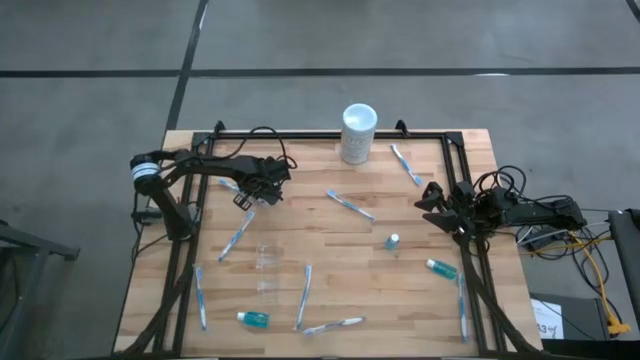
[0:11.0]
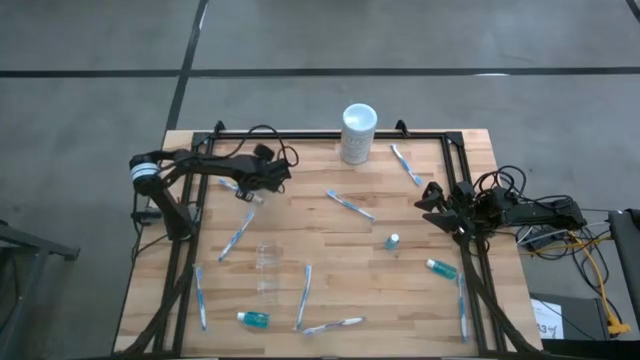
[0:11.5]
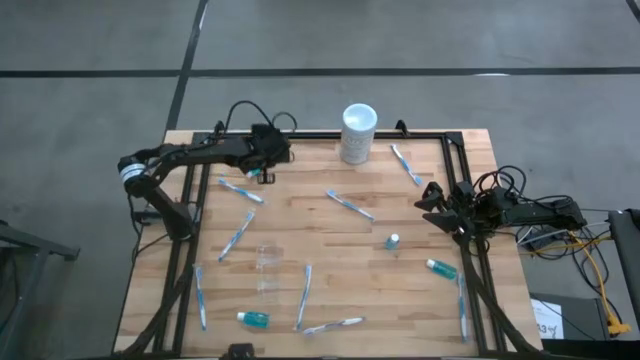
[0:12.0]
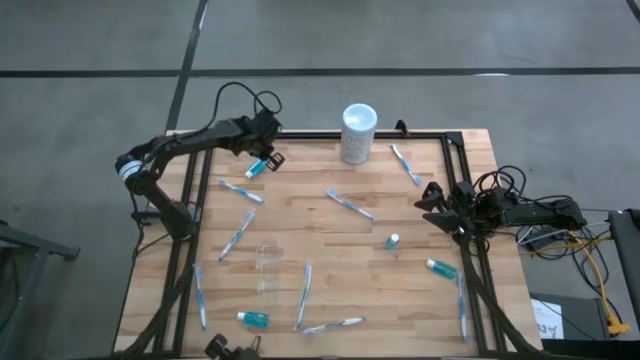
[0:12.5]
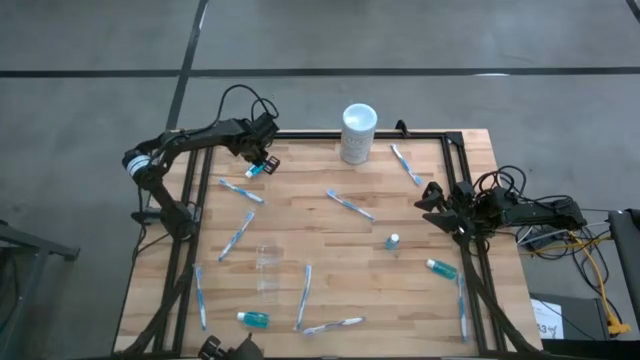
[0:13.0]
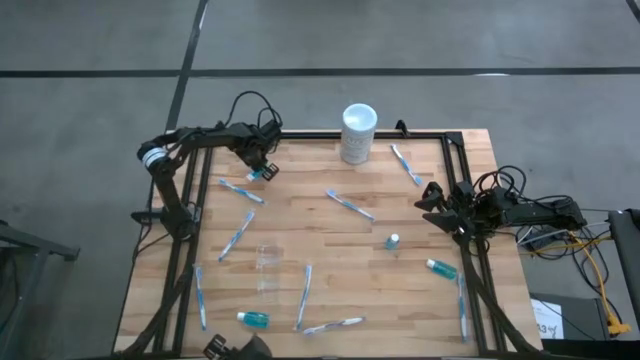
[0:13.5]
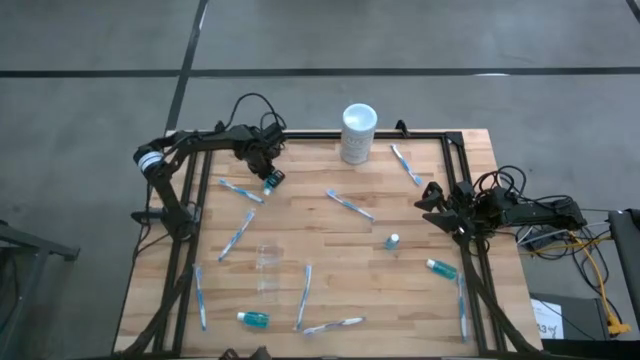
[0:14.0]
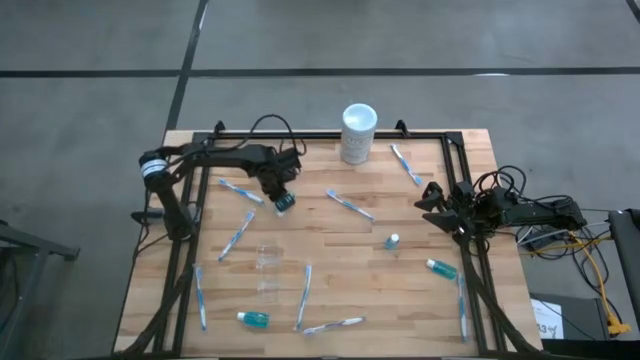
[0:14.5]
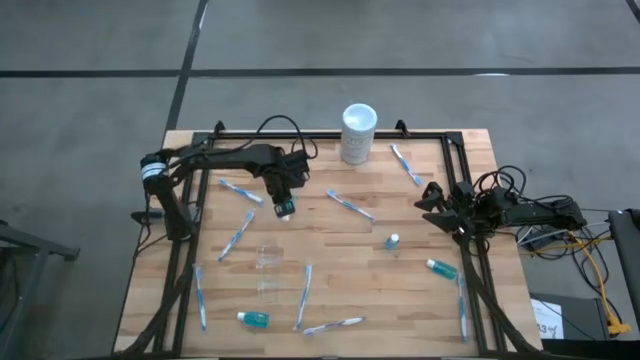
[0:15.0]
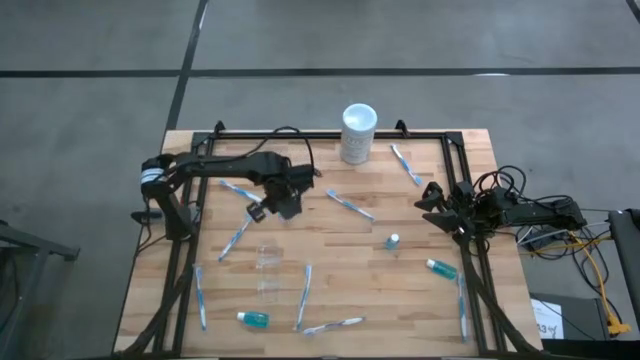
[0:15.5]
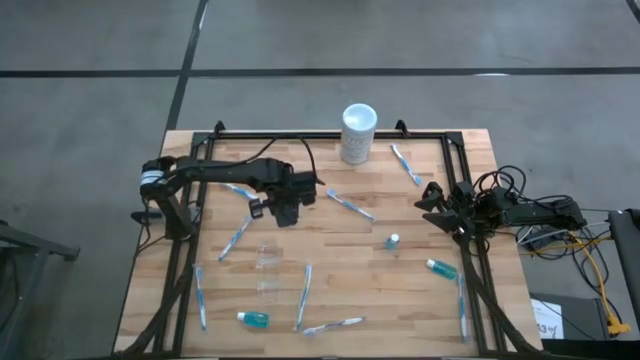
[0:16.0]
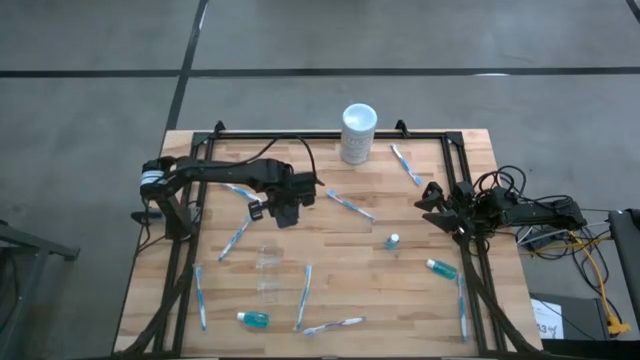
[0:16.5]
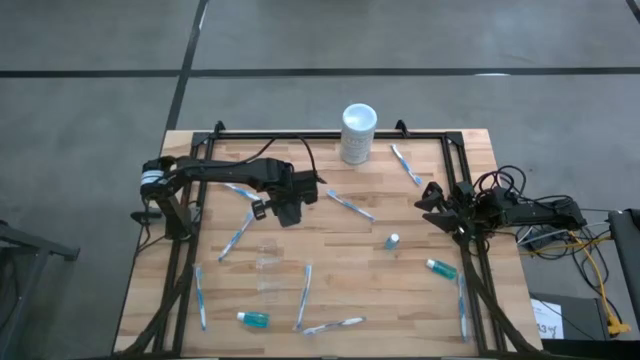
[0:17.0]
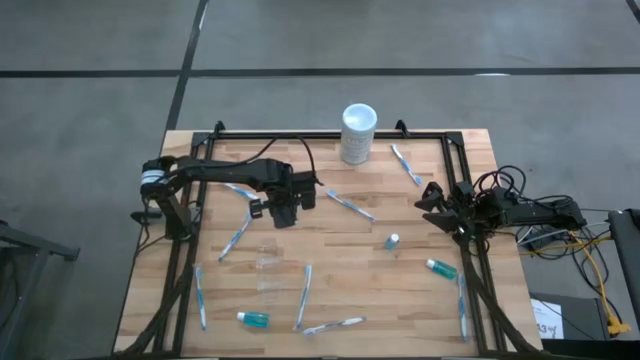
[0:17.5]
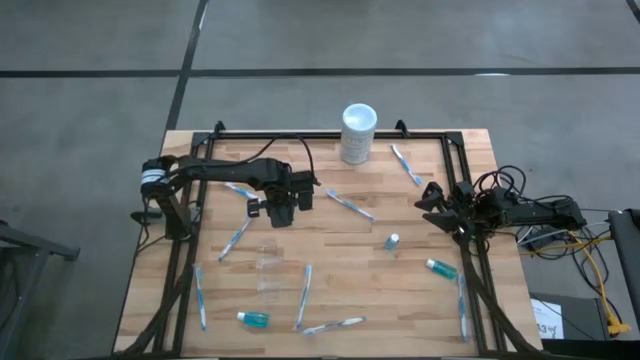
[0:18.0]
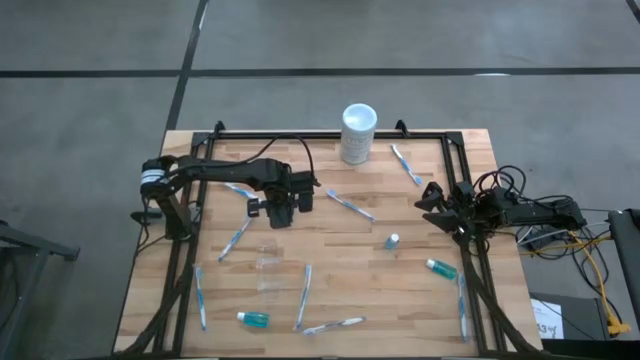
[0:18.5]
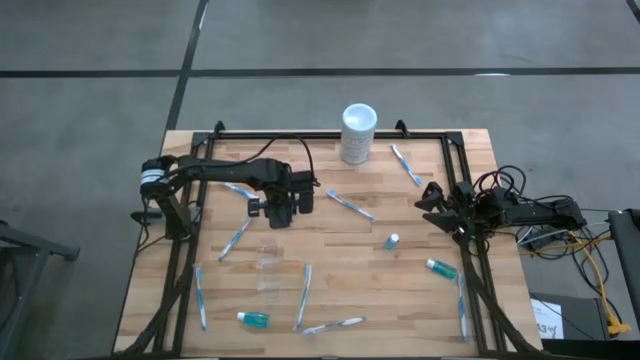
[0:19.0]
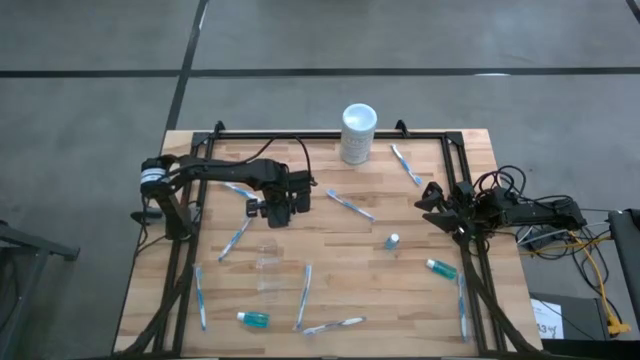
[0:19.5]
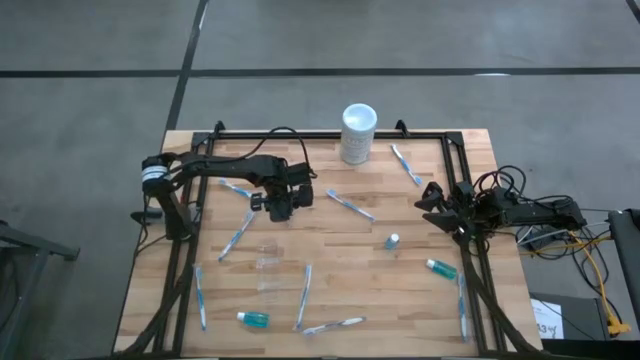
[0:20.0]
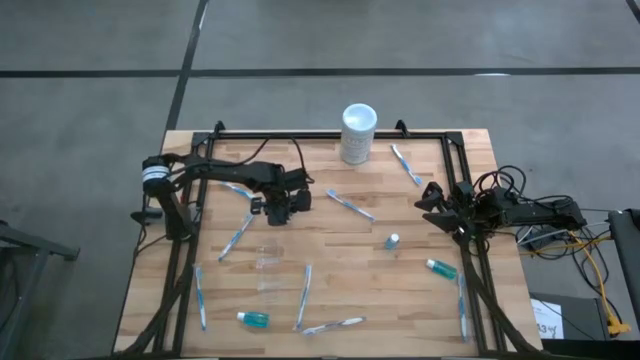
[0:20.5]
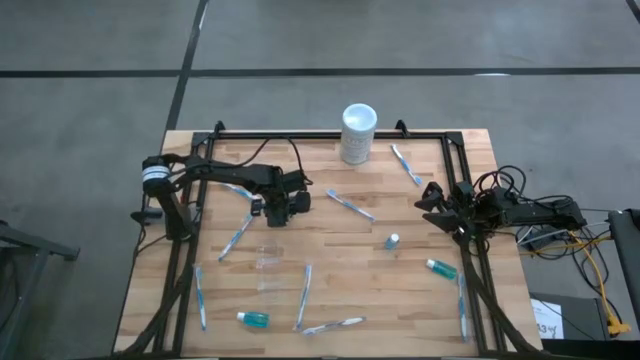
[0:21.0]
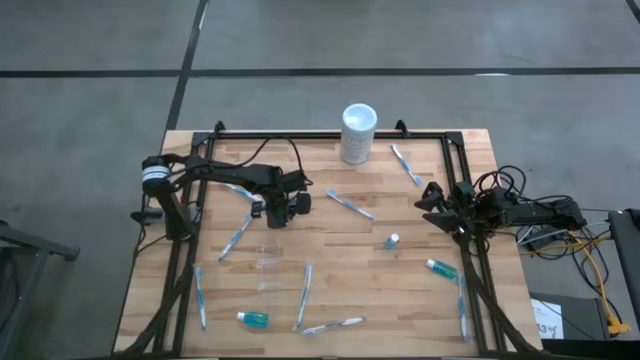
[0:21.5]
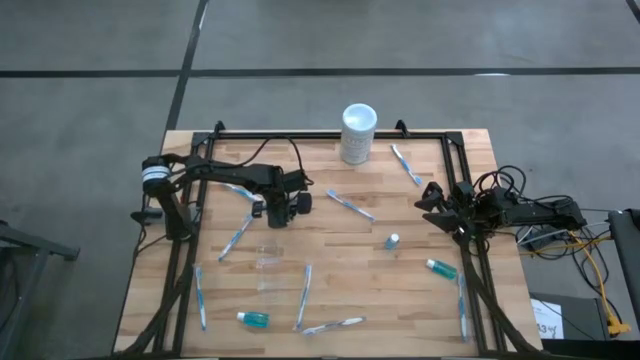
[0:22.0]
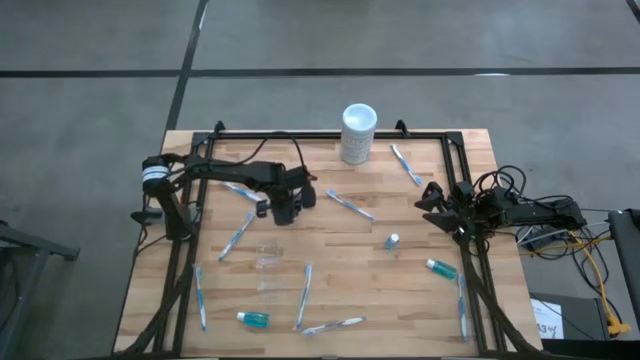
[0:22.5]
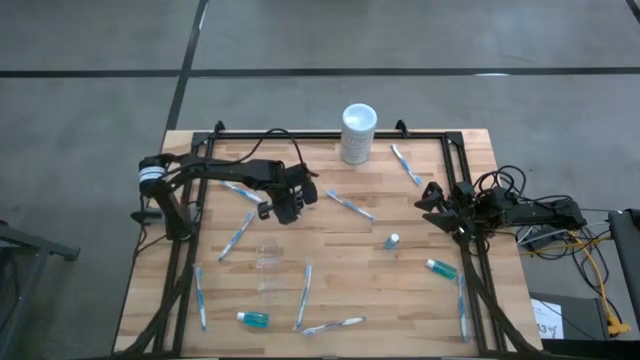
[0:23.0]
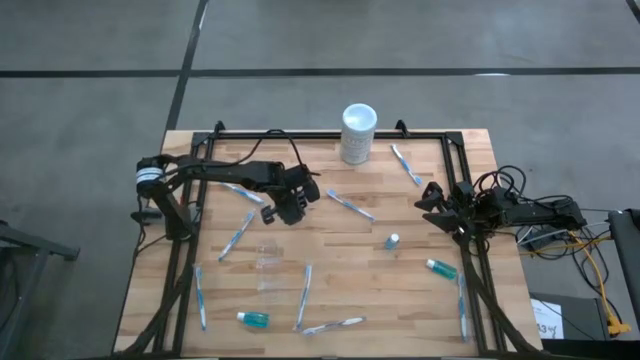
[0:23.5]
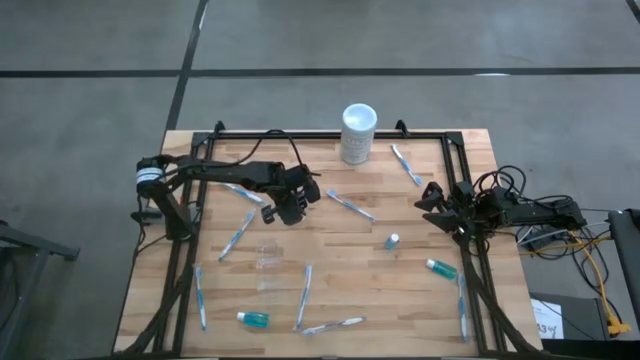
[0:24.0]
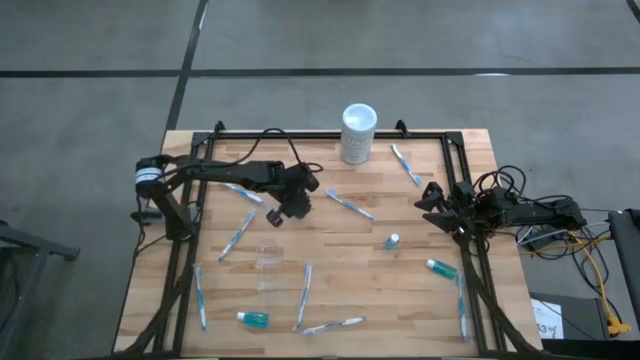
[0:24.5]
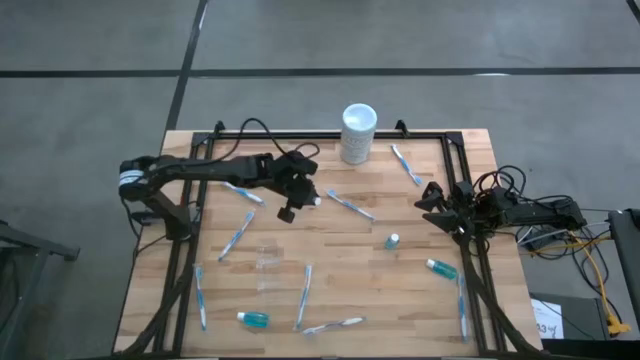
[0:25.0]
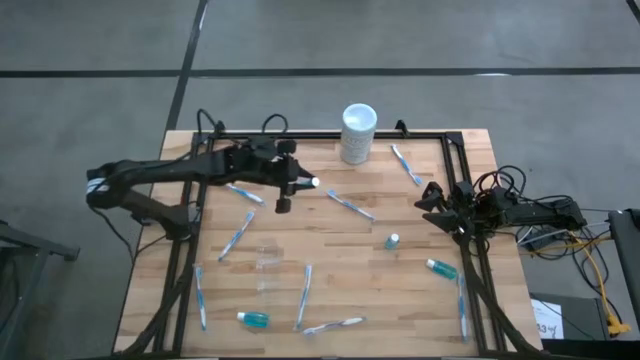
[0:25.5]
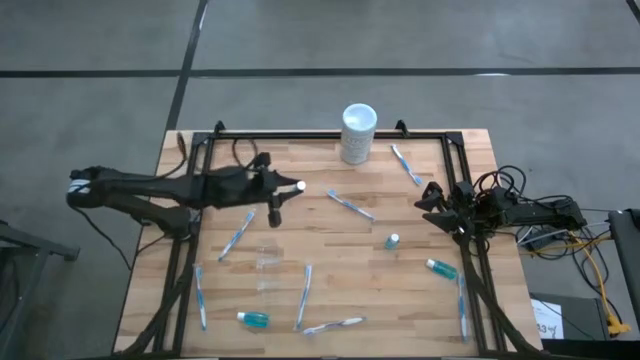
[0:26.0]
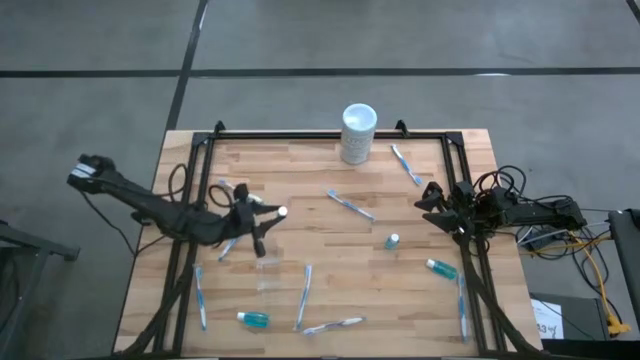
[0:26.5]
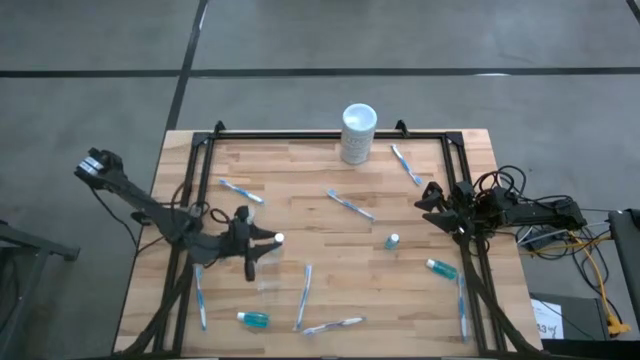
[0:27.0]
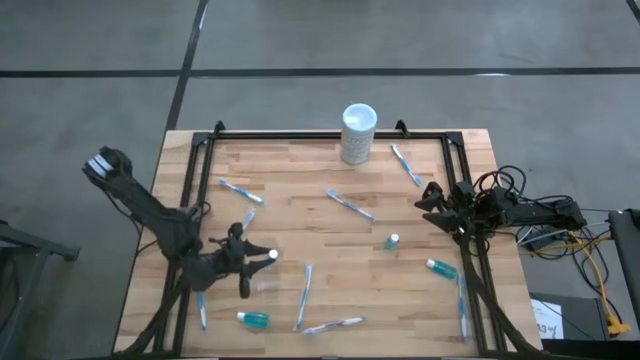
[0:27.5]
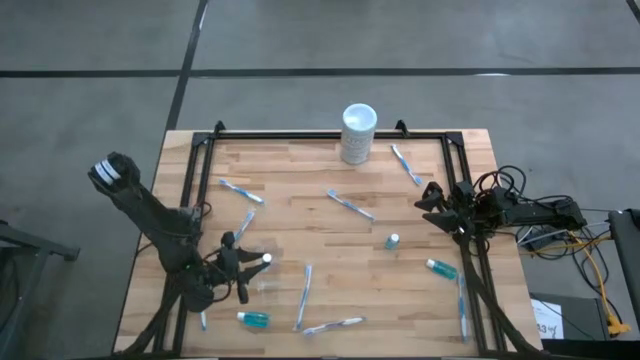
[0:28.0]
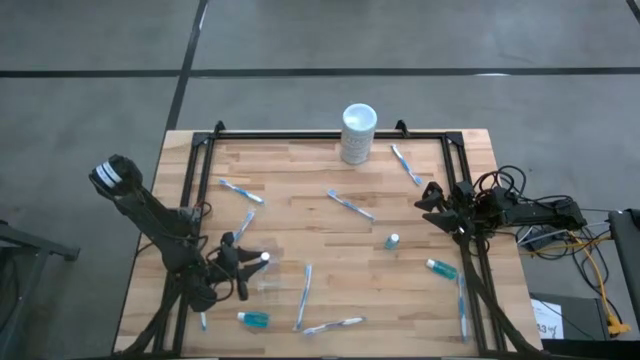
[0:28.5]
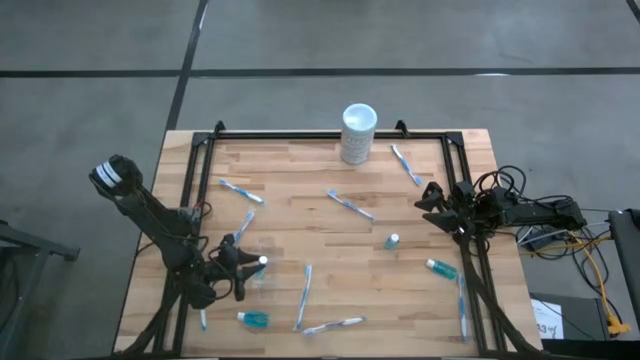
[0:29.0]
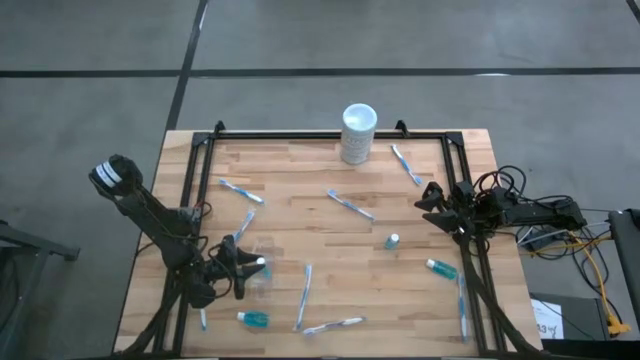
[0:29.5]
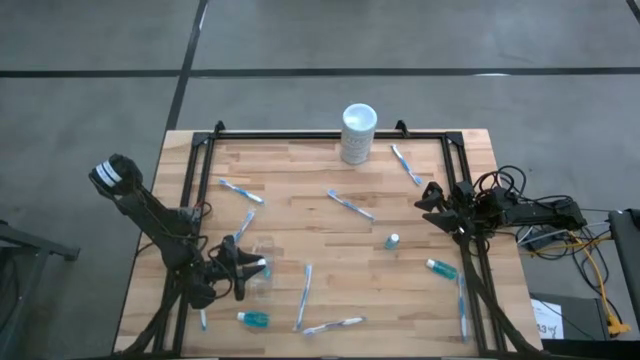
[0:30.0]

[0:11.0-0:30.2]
Task: Pick & Place toothbrushing station
Put the blue mouthwash bottle into the transparent organizer
